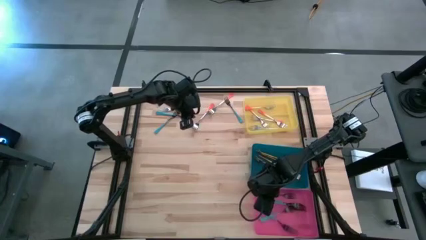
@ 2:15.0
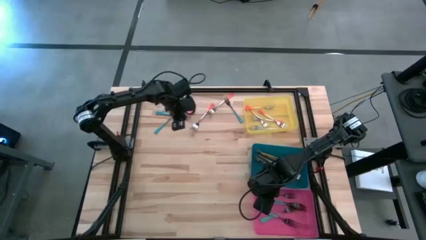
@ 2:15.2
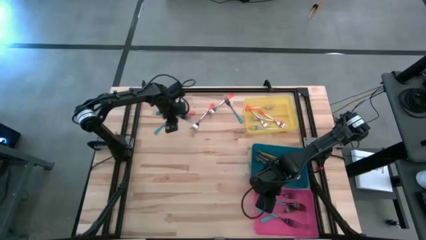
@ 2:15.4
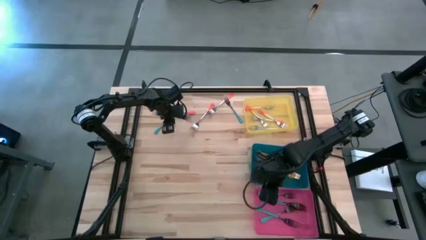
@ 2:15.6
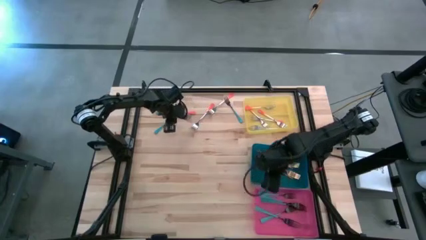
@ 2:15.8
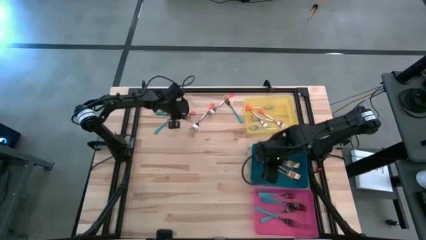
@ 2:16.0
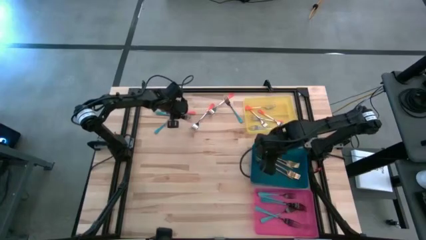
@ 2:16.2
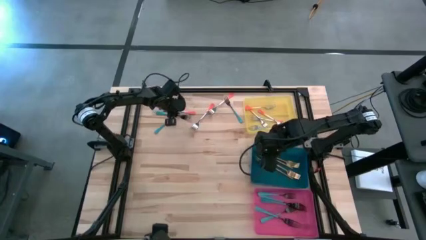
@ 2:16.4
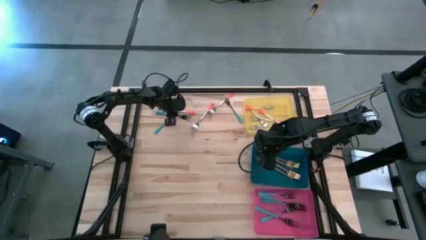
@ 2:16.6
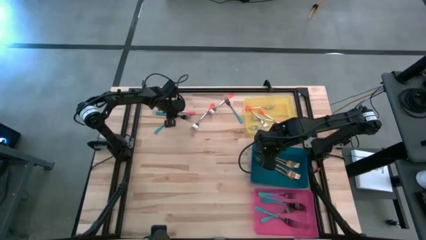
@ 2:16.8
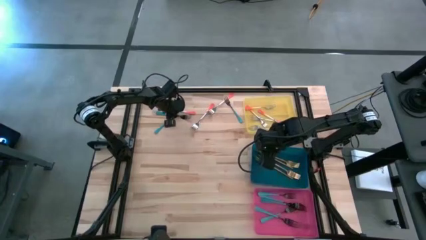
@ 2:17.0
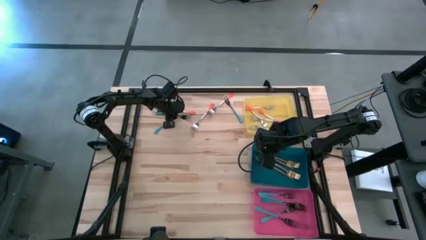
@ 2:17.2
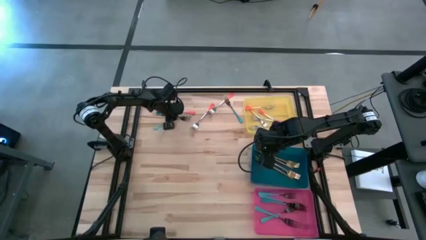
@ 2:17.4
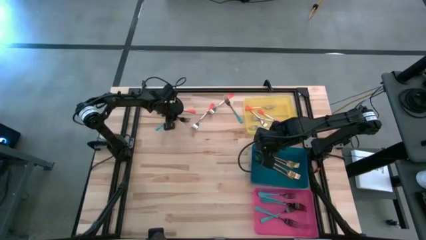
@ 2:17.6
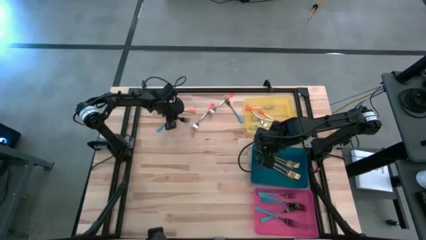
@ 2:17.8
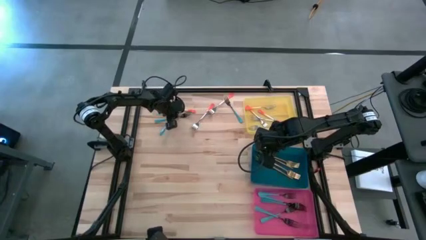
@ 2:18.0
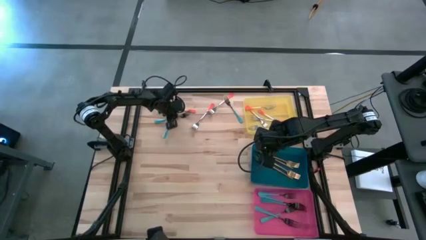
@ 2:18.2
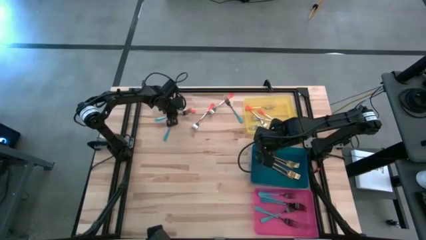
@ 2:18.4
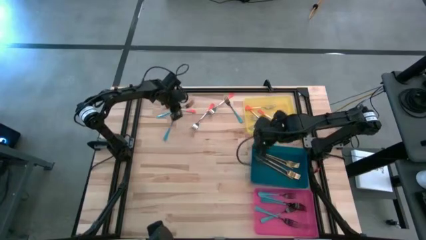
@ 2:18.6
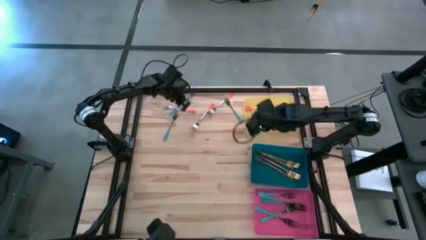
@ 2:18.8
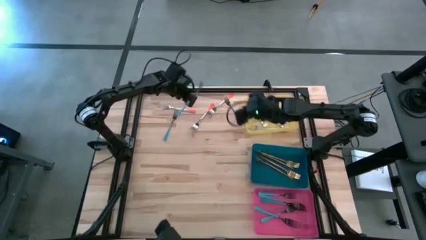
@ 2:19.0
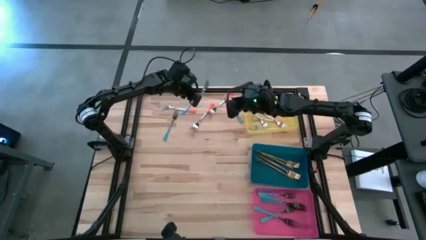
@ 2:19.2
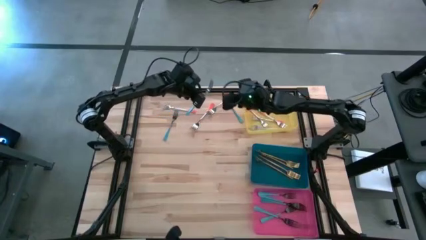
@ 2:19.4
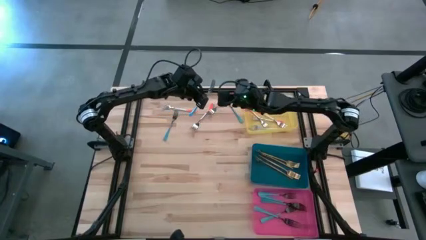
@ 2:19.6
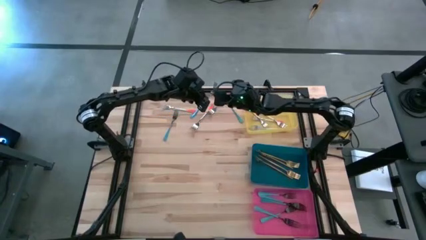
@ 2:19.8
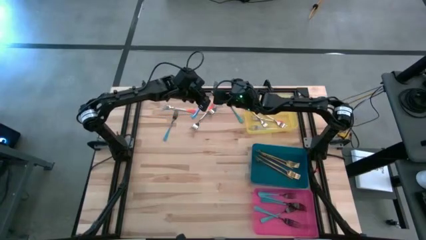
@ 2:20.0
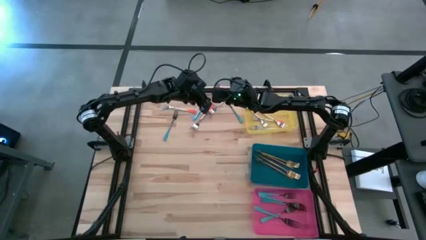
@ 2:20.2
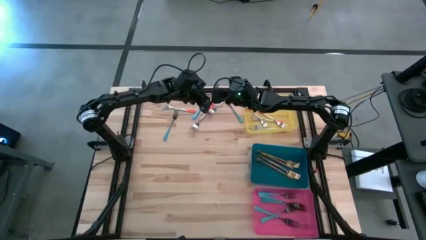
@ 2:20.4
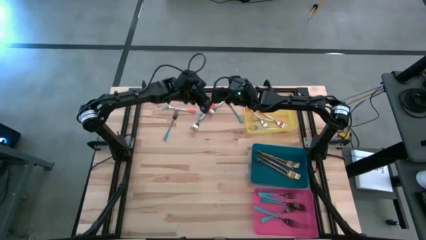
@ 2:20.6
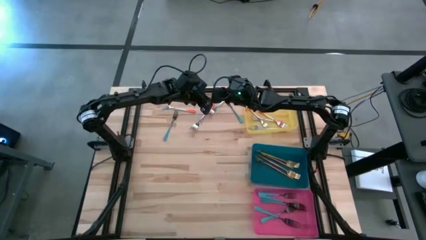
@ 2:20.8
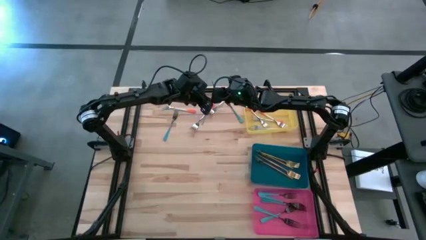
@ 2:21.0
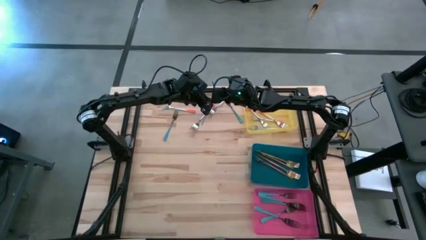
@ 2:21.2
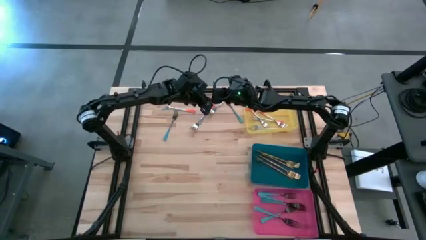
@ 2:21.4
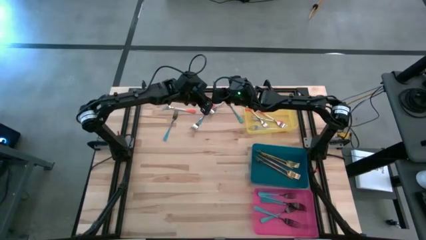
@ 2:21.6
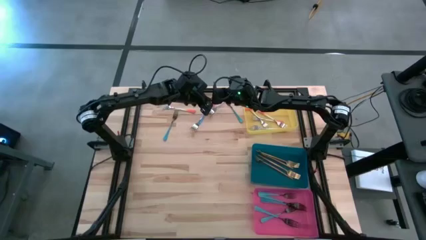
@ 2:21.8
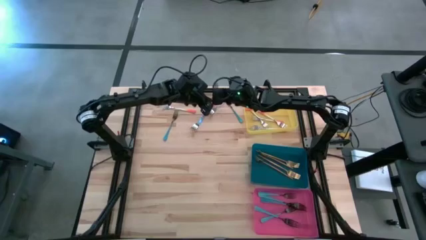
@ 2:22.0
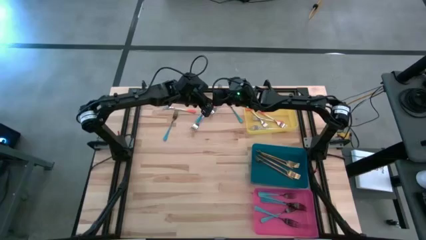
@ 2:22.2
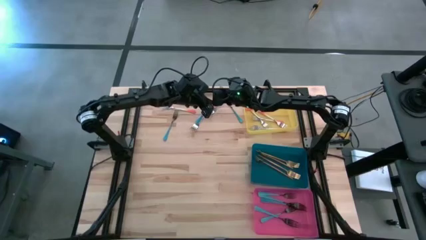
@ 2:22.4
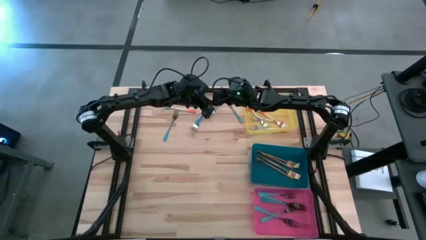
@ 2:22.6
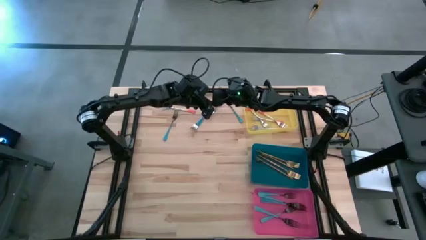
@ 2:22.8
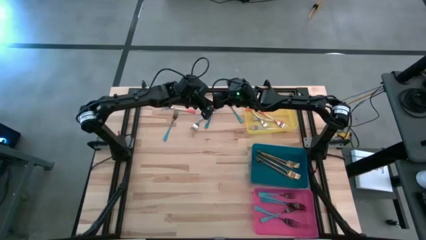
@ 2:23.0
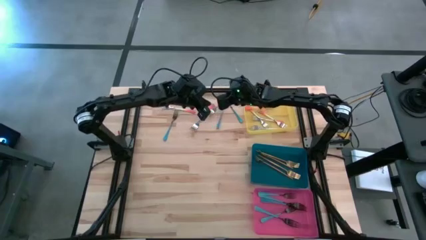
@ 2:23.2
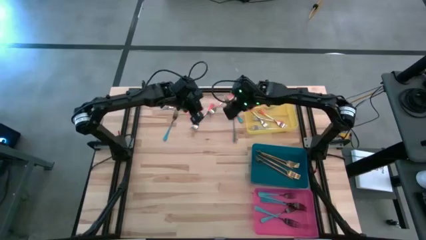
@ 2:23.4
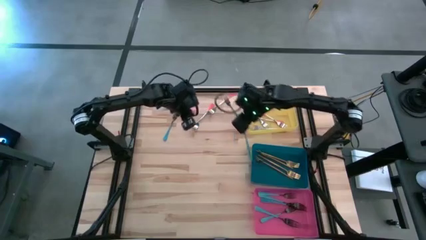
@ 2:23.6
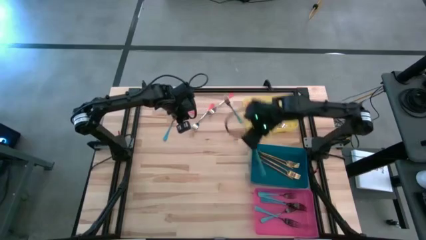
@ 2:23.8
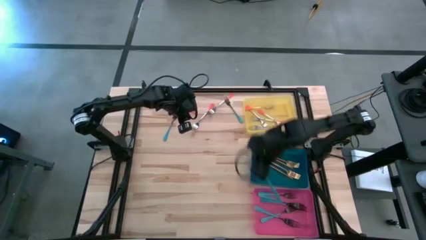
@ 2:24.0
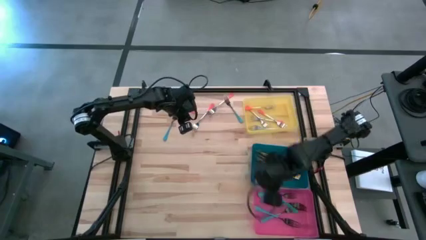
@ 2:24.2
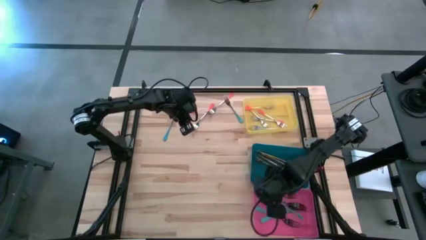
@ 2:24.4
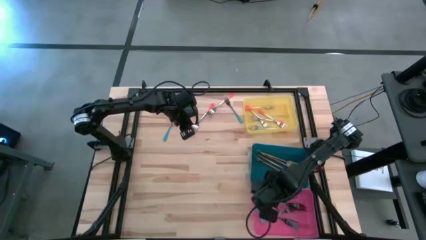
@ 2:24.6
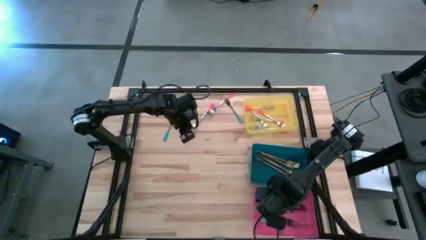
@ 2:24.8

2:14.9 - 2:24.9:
Task: Sort silverware by color (type)
Put the blue fork into the pink bin

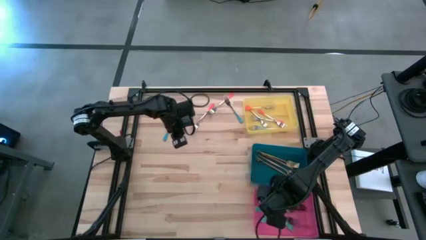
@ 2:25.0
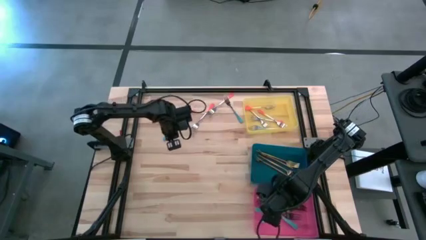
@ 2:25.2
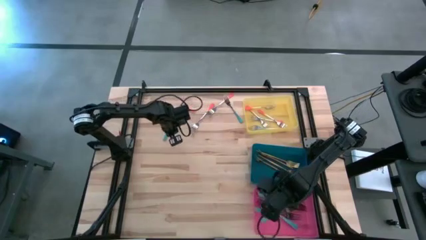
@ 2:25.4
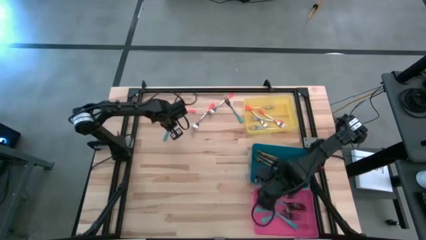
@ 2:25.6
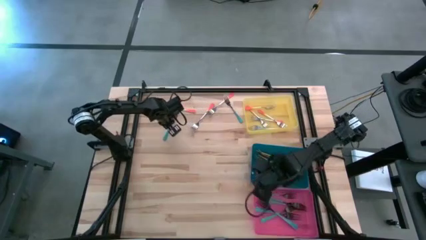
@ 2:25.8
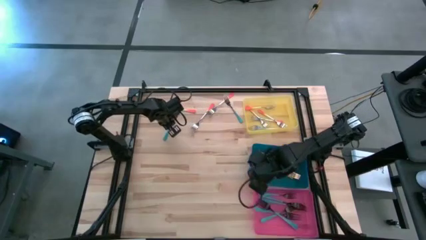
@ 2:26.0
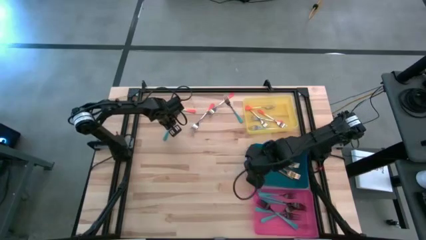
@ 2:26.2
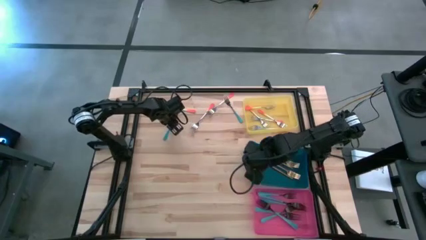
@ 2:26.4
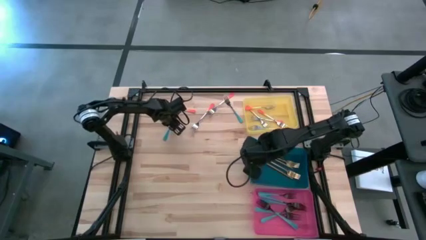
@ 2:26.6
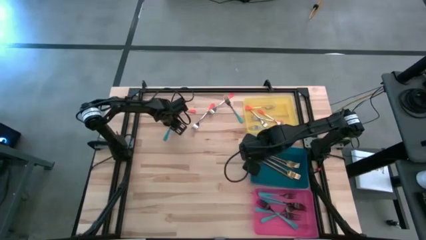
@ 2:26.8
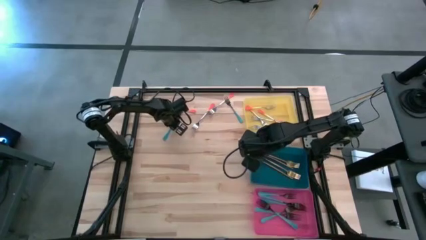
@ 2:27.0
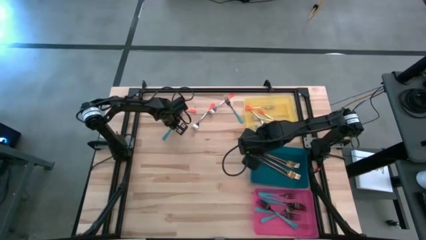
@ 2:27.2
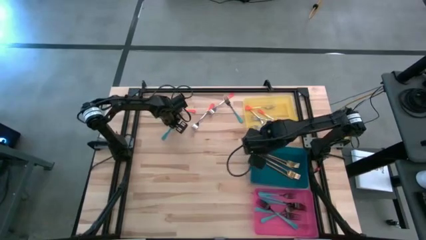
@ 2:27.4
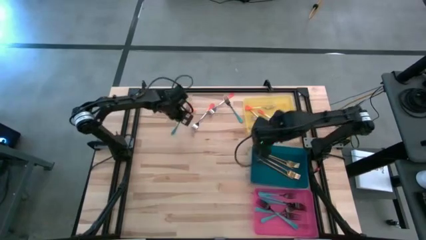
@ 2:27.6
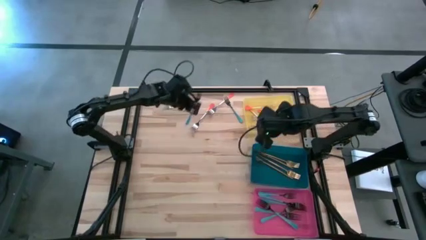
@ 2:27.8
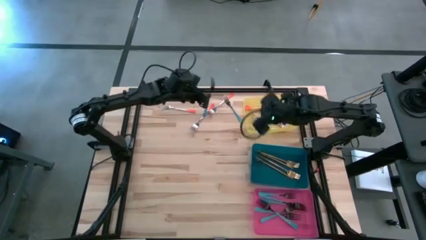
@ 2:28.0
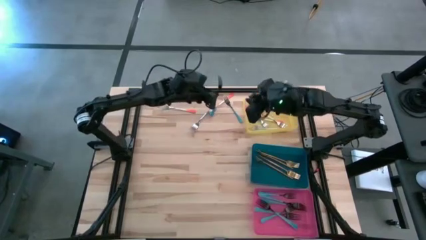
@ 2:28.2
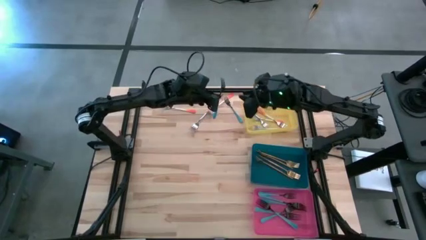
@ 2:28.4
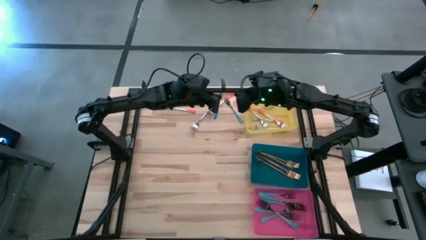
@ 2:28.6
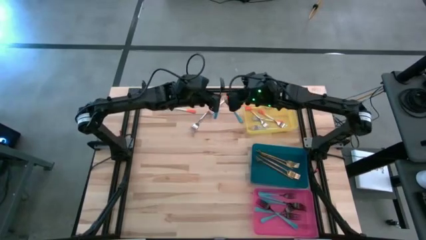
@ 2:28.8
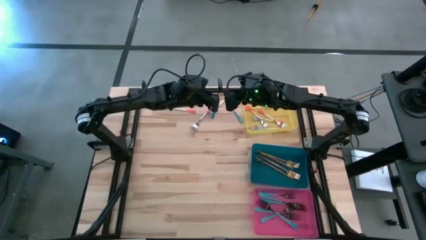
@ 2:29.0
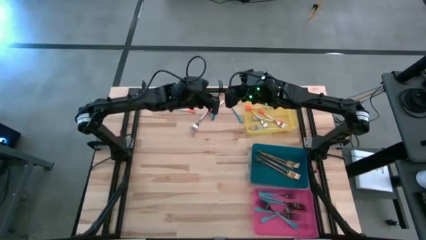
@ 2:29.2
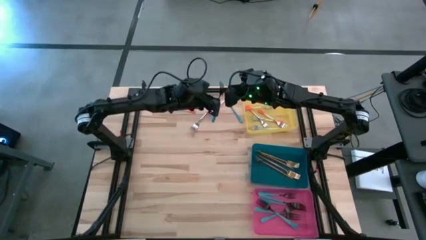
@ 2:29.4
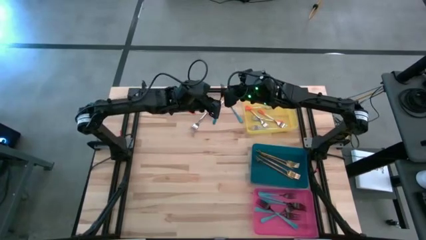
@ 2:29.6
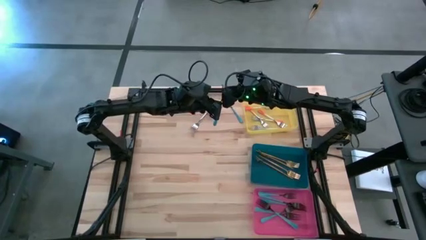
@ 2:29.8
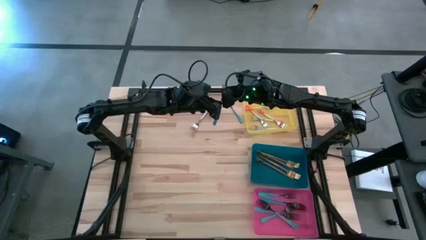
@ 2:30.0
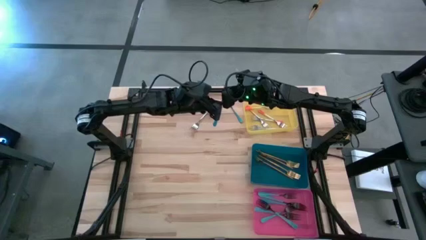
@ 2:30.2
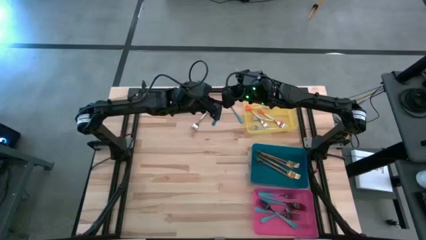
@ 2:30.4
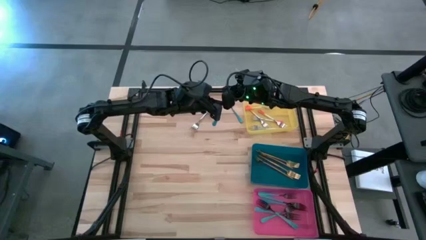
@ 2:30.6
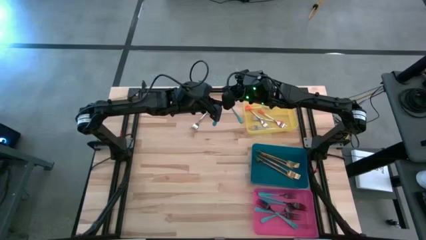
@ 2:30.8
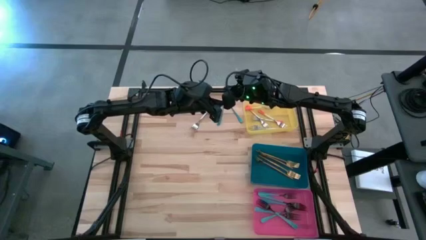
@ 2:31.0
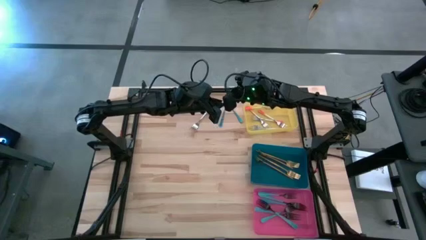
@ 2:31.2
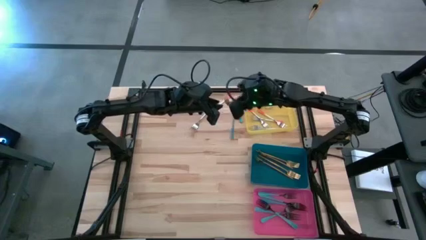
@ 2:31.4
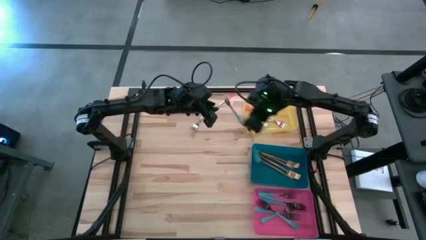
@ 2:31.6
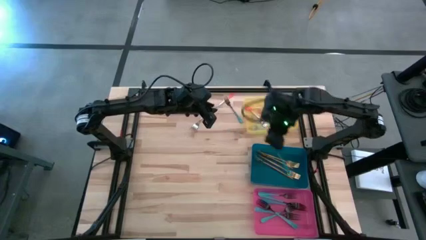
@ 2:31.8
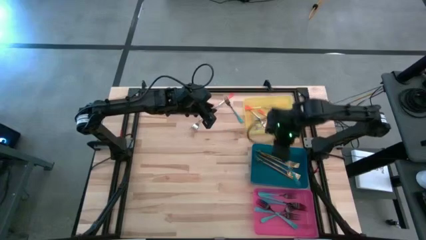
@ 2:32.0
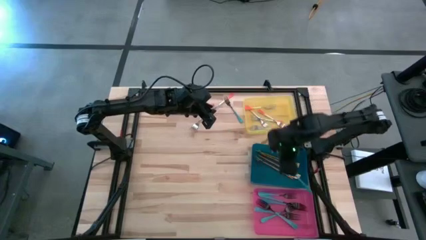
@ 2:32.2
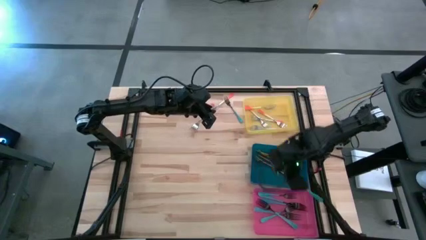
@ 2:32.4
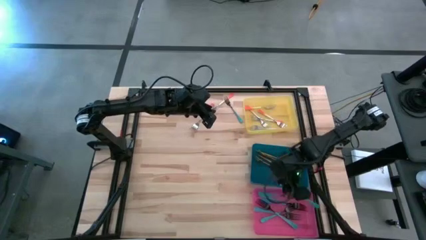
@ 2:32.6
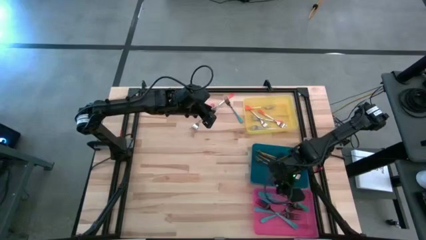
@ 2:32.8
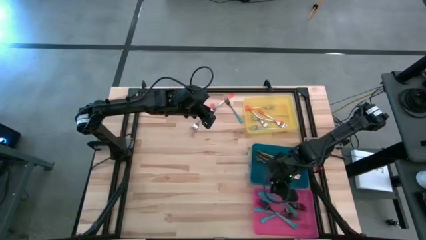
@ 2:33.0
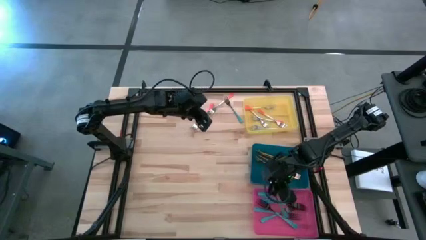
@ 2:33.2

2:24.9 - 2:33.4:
Put the blue fork into the pink bin
